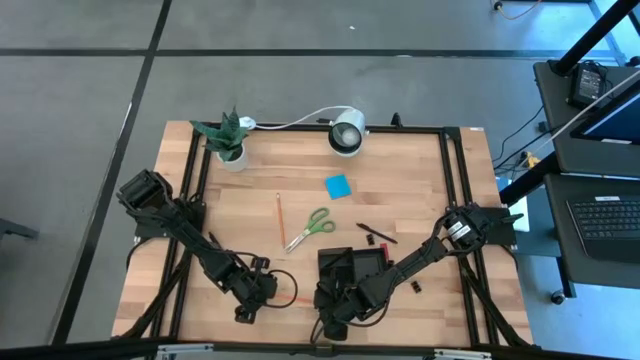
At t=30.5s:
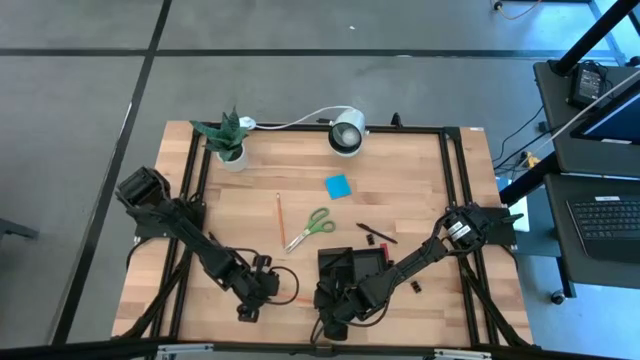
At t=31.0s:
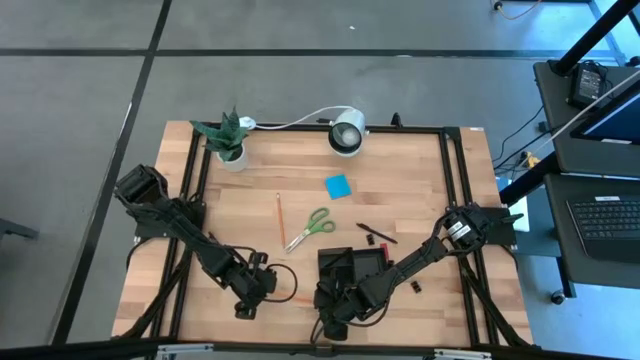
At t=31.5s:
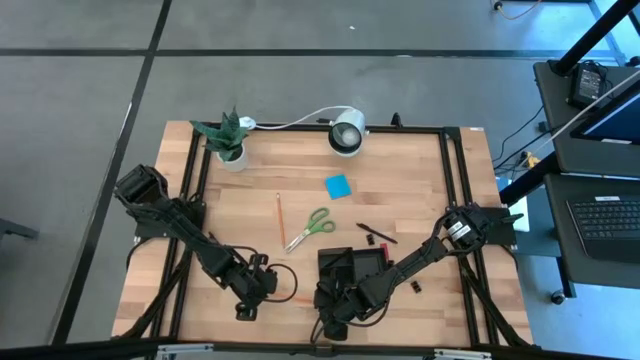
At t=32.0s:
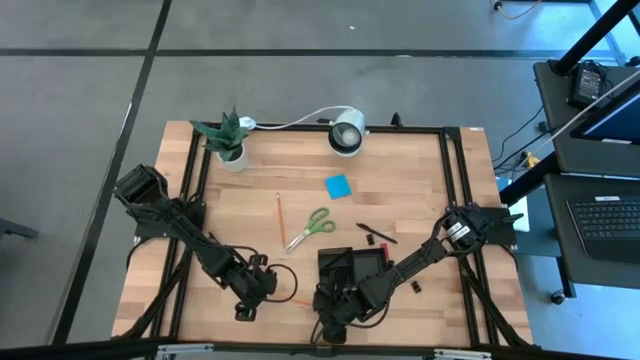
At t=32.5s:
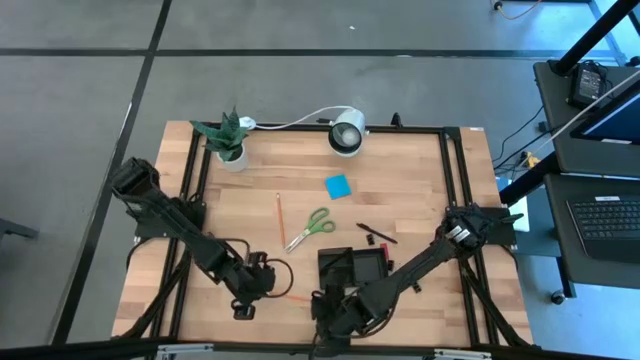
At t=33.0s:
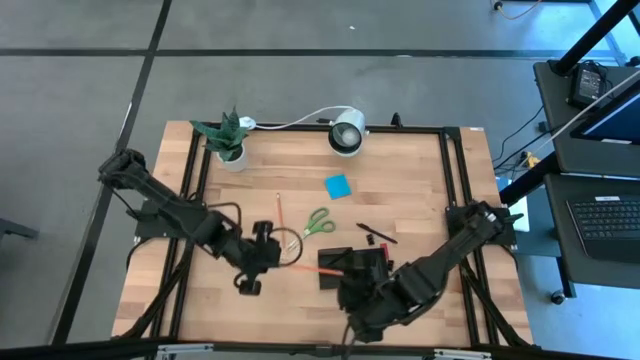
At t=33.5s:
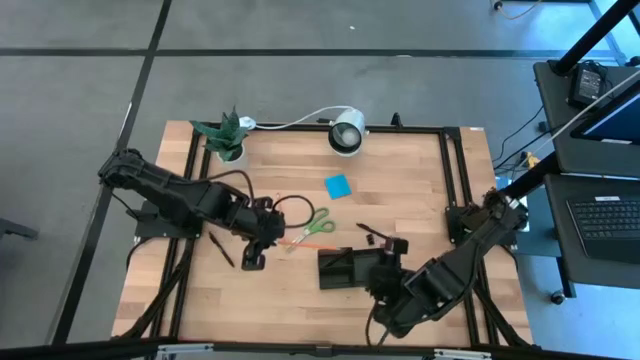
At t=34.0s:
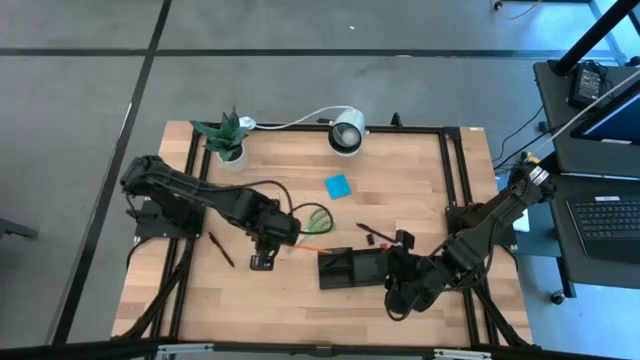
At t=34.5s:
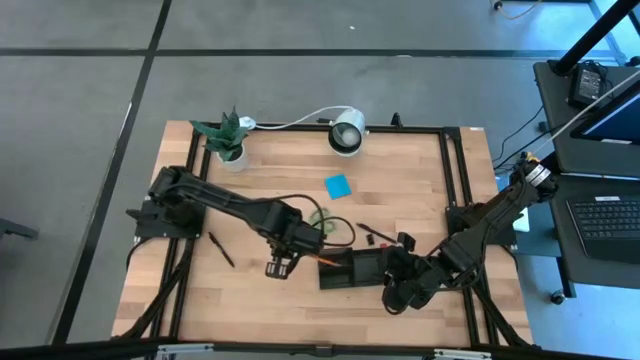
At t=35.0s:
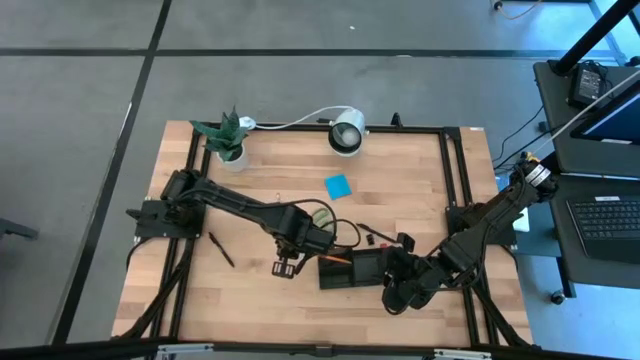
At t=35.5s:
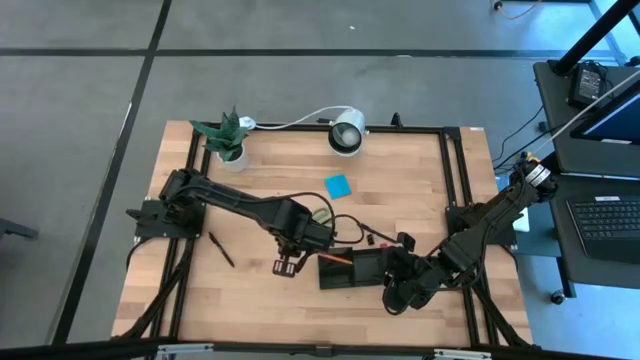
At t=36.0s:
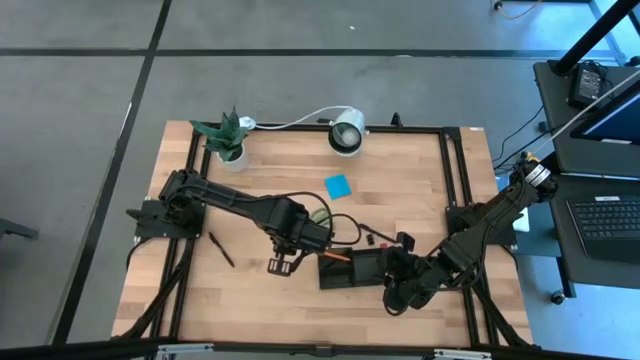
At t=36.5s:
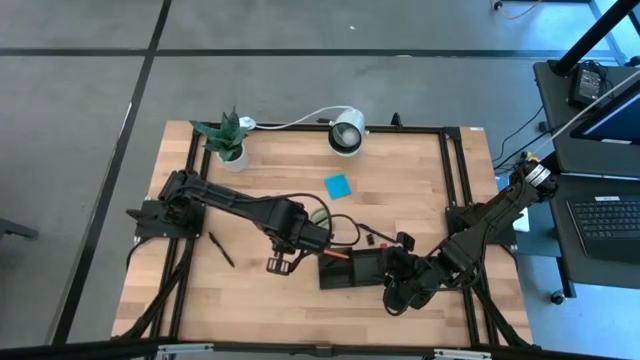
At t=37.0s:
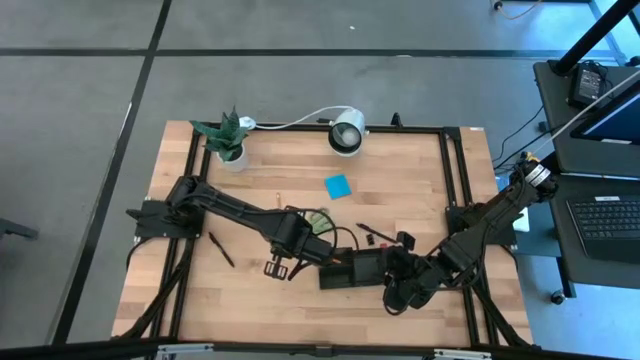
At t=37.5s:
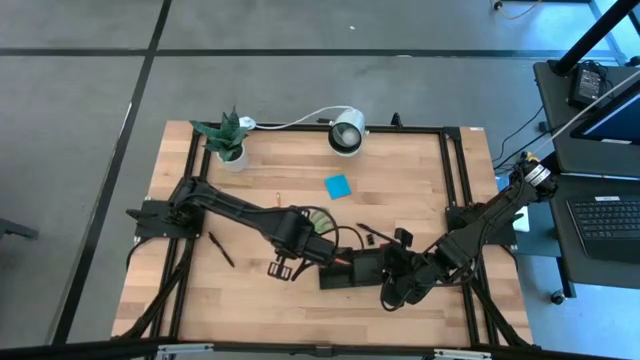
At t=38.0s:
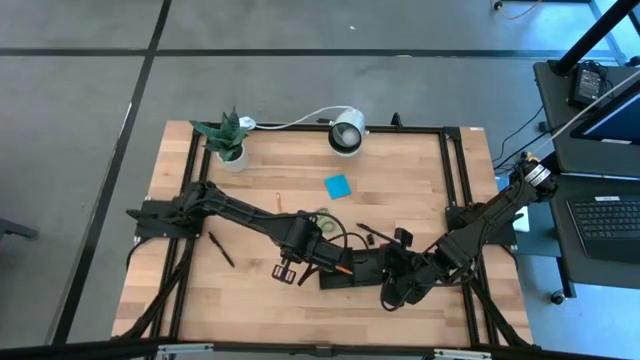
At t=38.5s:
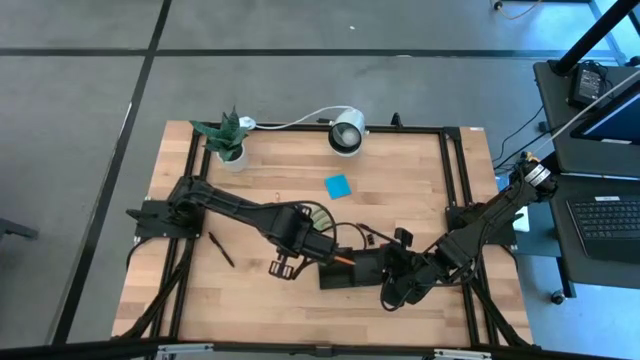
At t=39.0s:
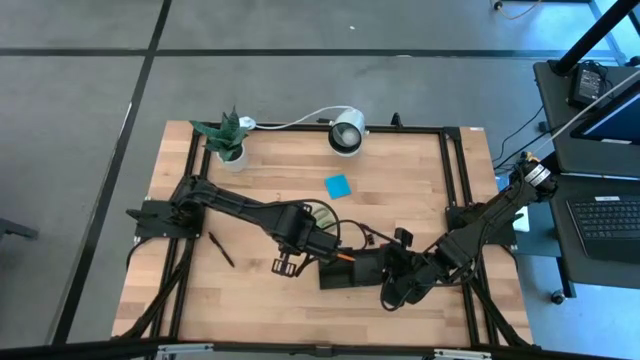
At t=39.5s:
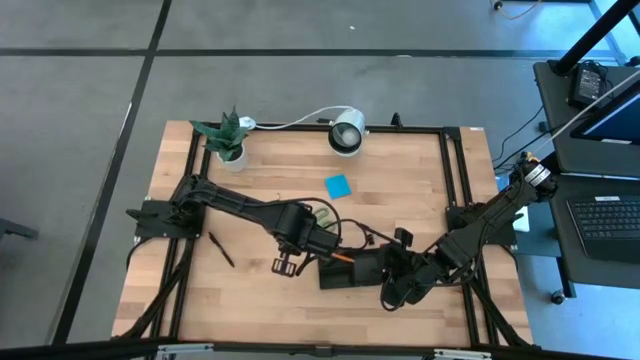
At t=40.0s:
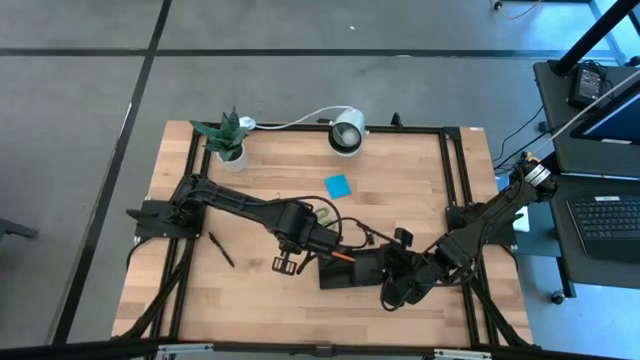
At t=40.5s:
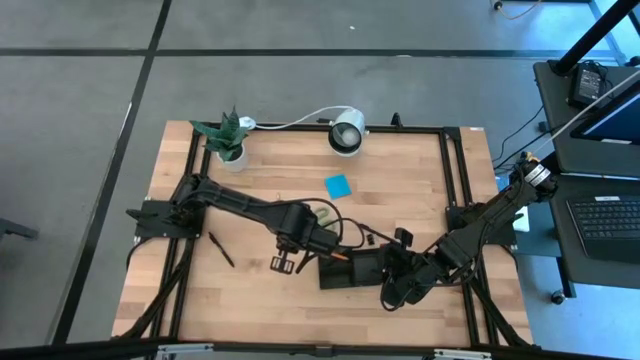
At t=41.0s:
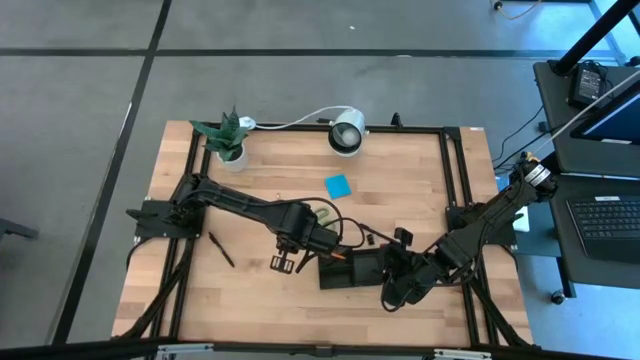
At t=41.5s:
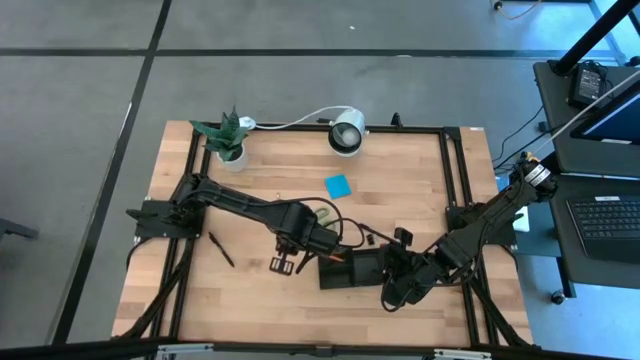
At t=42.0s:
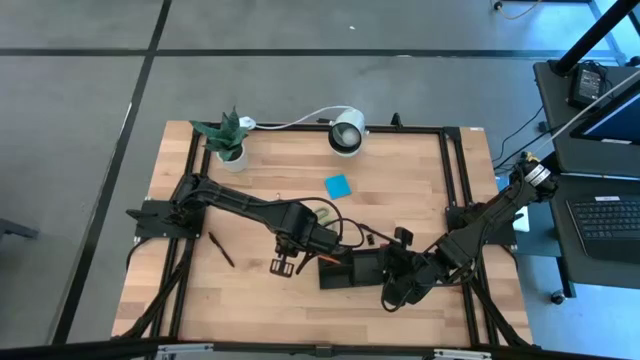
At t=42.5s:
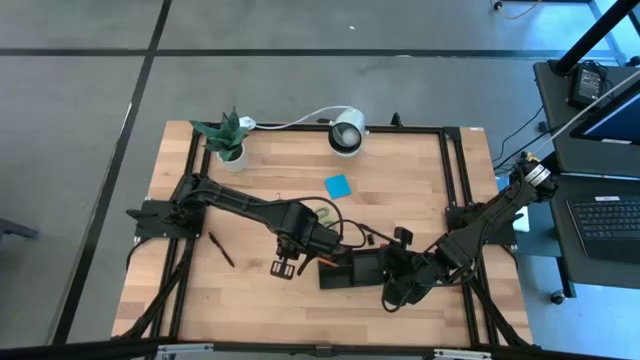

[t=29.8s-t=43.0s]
Task: Pick and place office supplies into organizer
Put the bottom pencil into the desk organizer

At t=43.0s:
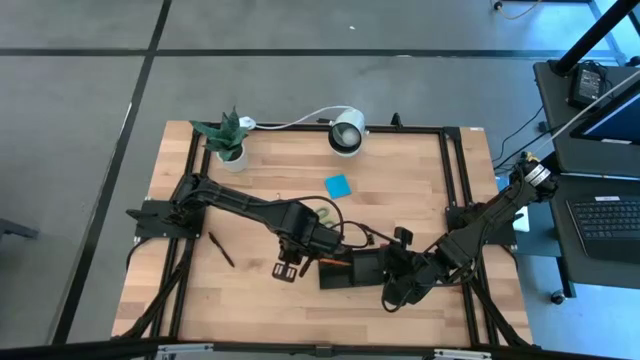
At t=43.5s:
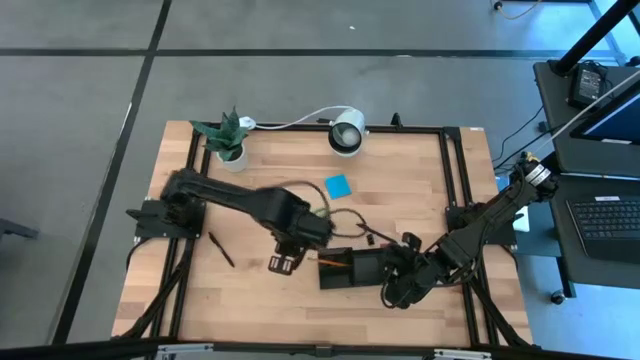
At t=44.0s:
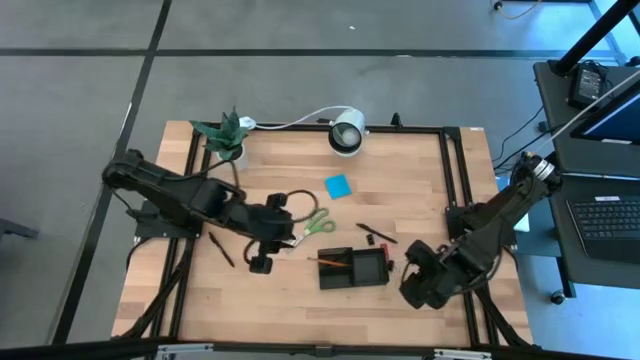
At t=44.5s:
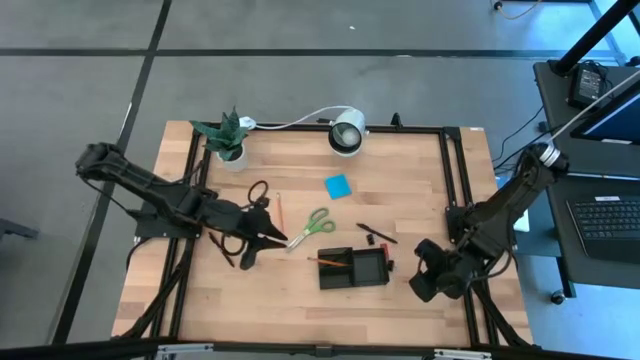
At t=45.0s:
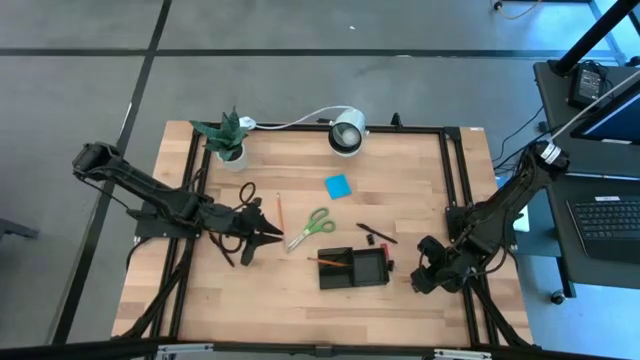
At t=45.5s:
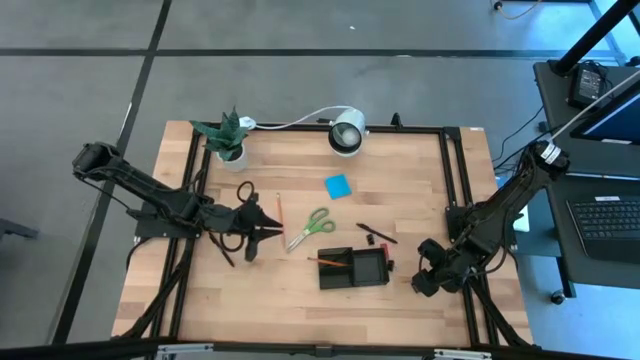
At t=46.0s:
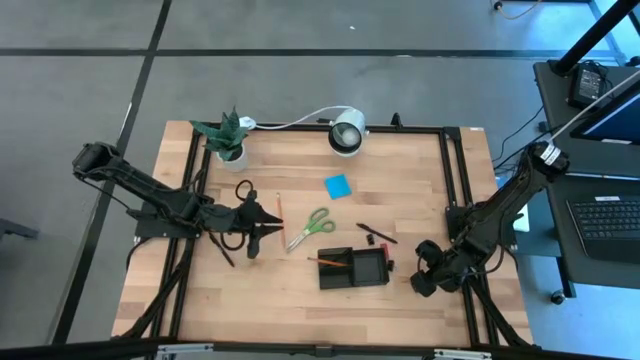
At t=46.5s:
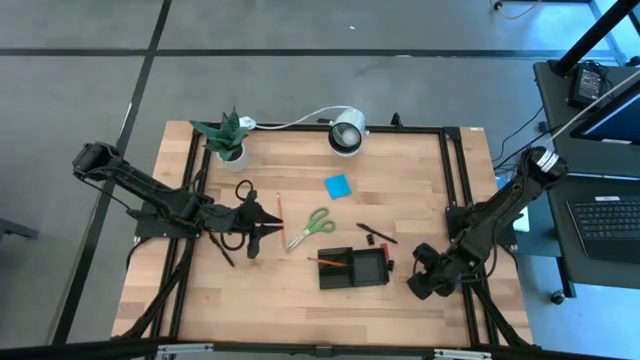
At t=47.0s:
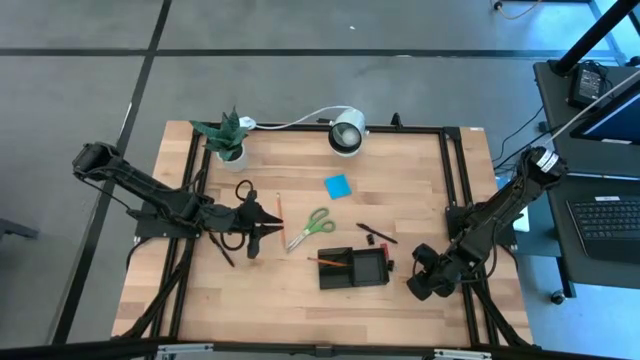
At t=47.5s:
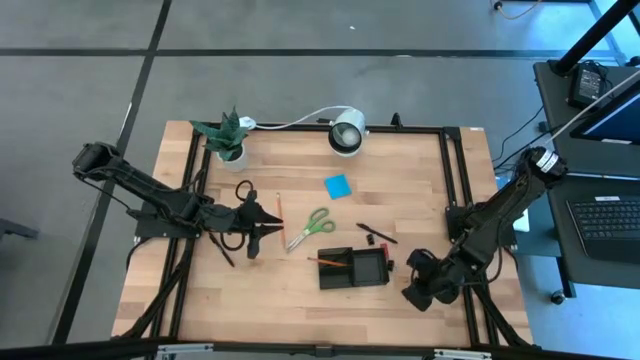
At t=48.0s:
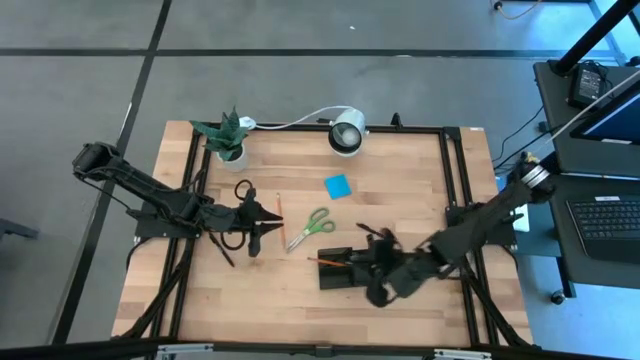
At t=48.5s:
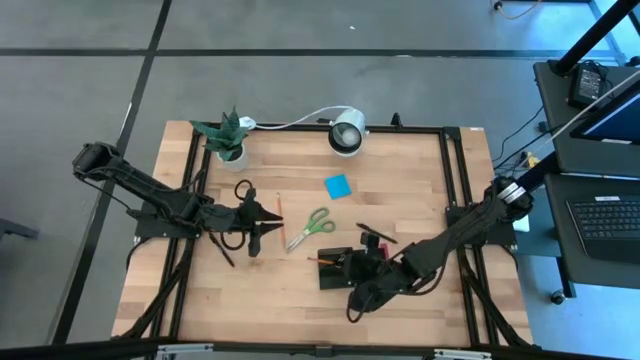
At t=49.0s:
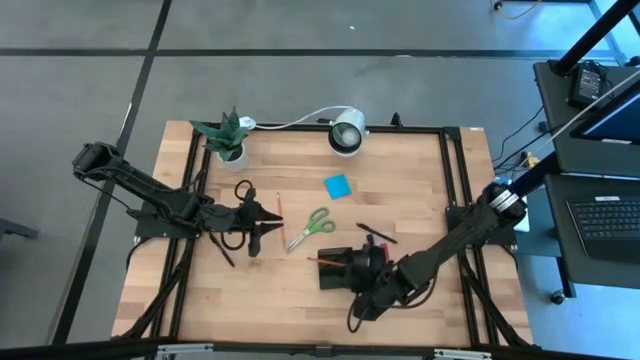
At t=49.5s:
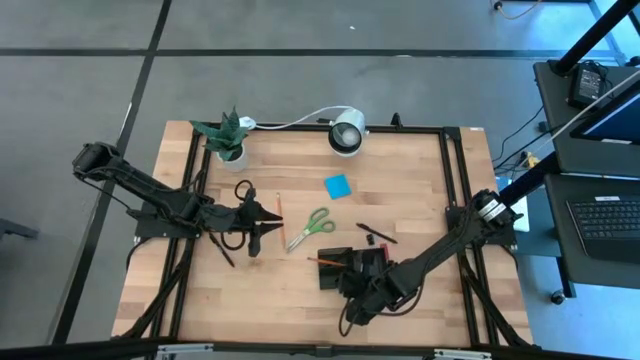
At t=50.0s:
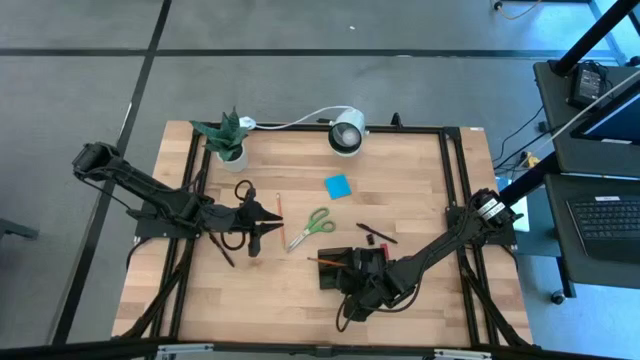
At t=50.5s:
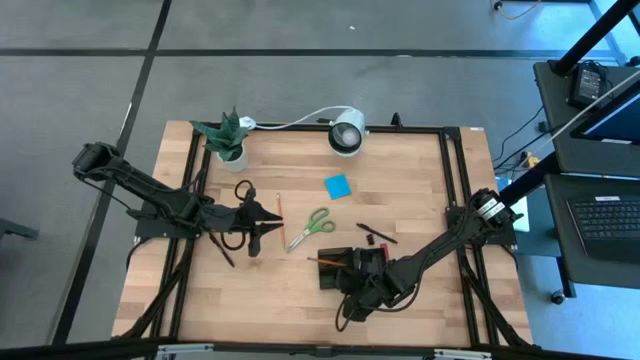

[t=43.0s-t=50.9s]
Put the bottom binder clip into the desk organizer
